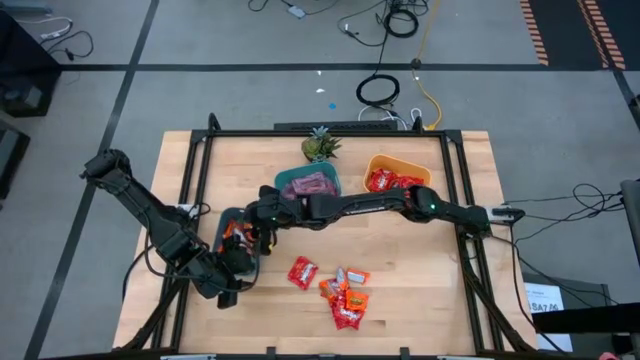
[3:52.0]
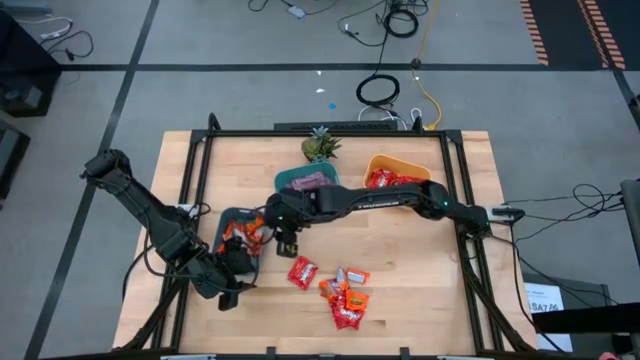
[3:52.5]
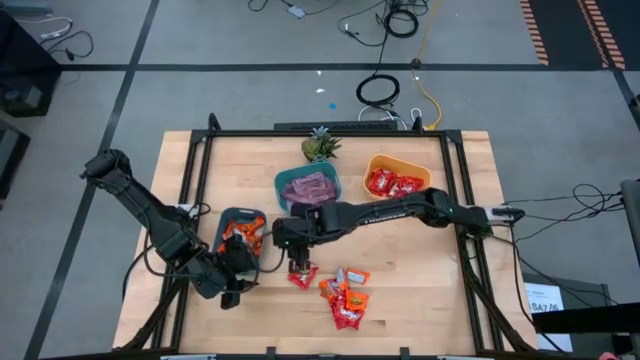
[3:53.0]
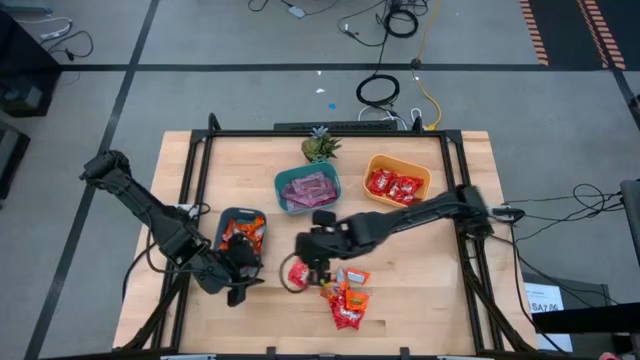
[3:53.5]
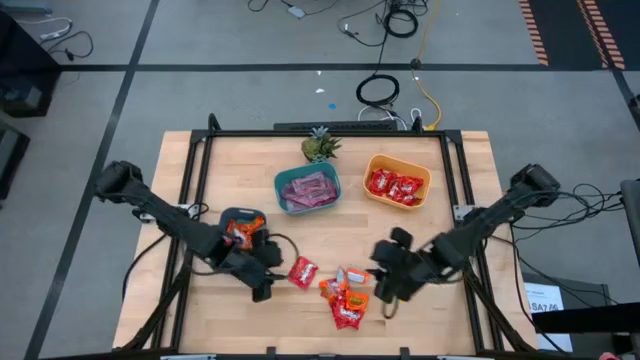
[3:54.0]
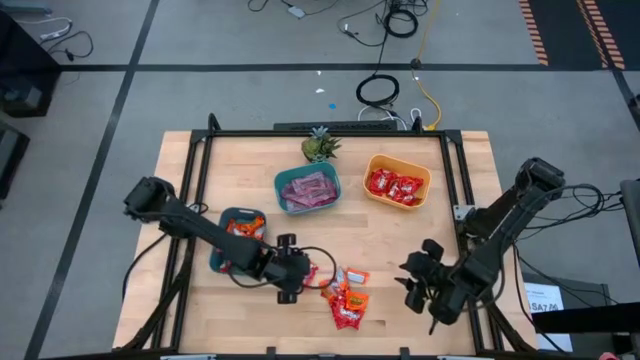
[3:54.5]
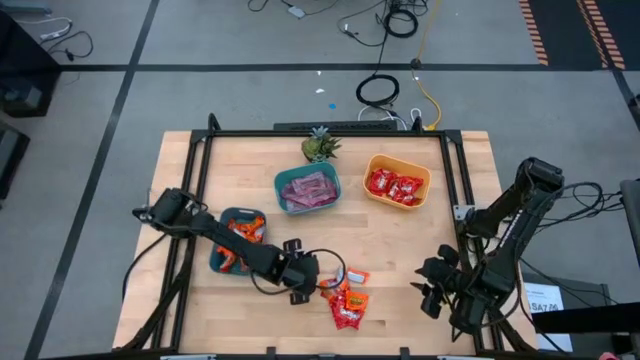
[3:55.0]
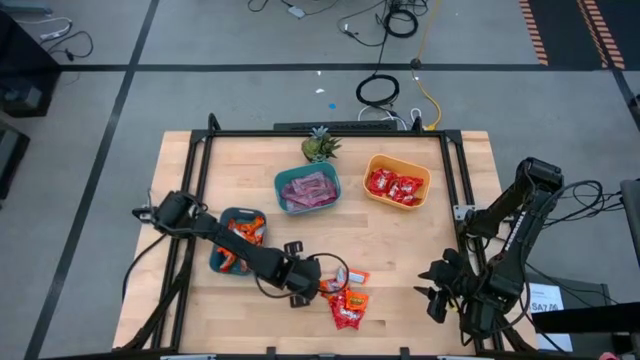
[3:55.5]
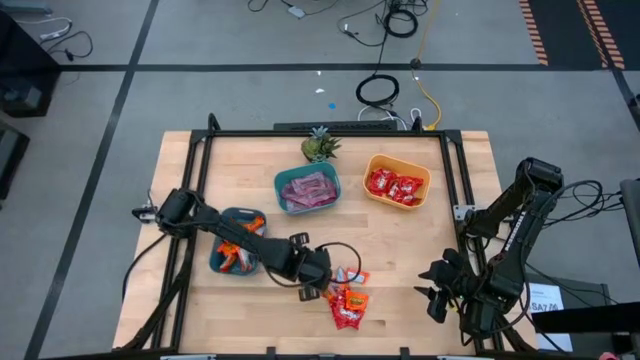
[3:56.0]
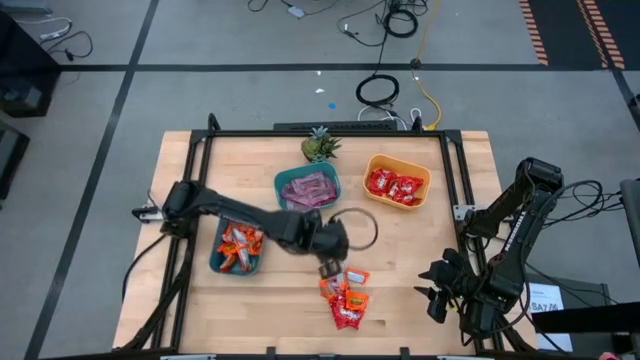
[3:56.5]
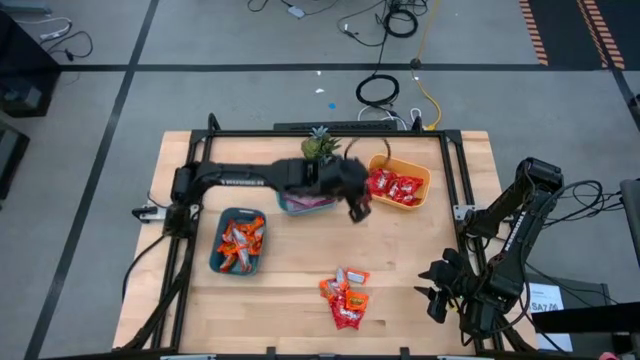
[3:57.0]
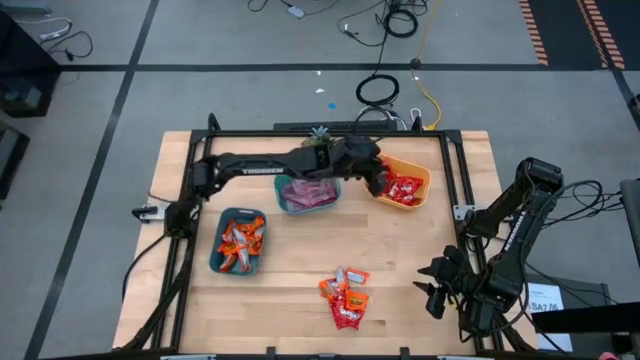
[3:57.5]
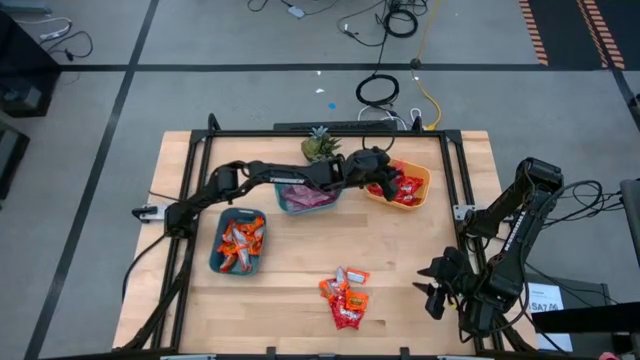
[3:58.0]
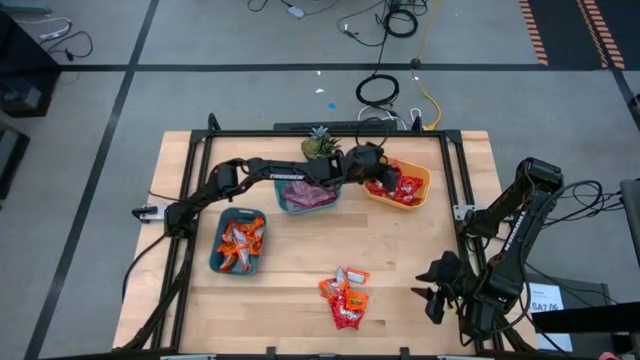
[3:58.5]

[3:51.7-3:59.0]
Task: Sort candy
Put the red candy into the yellow bin

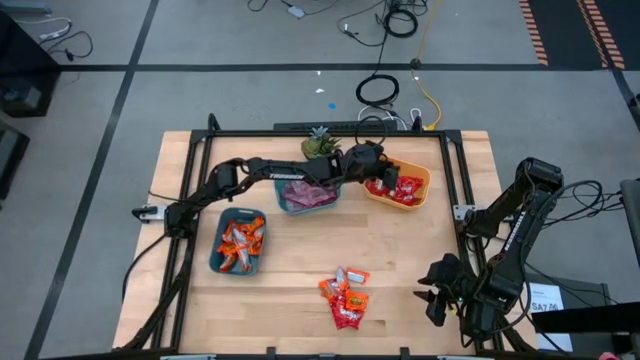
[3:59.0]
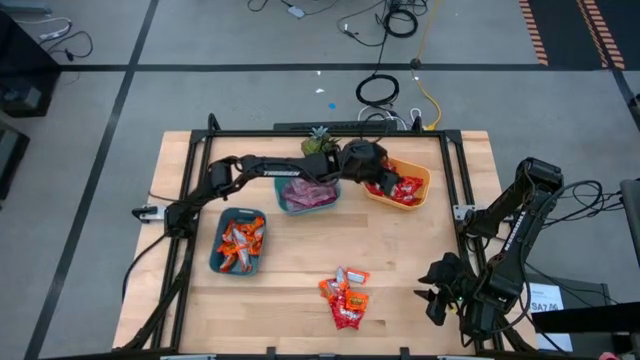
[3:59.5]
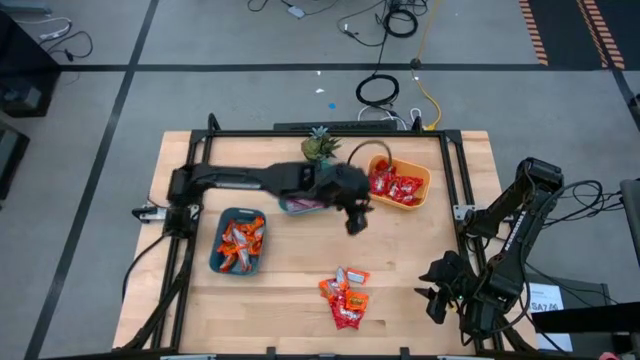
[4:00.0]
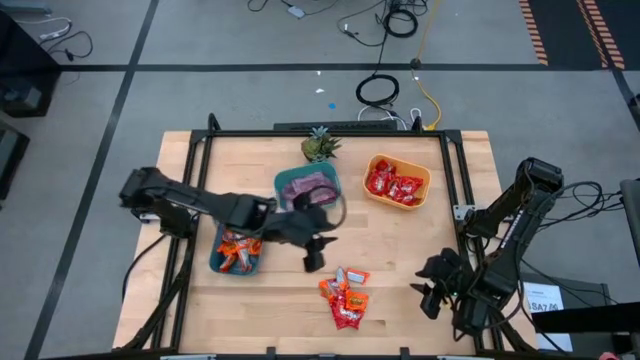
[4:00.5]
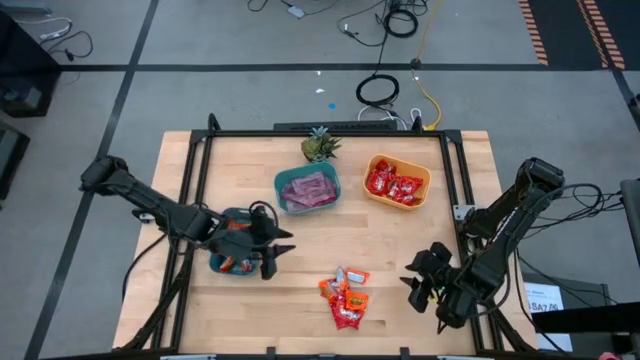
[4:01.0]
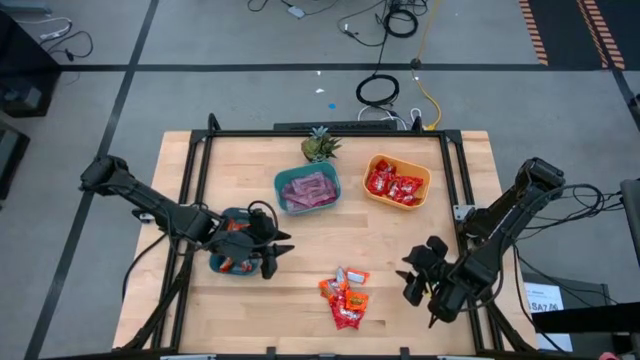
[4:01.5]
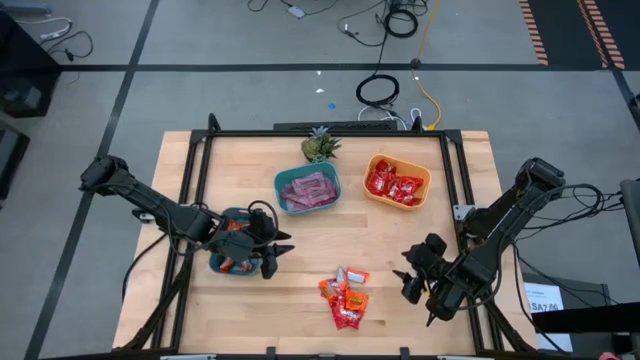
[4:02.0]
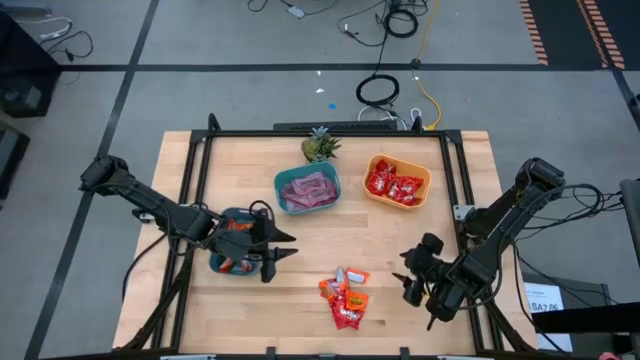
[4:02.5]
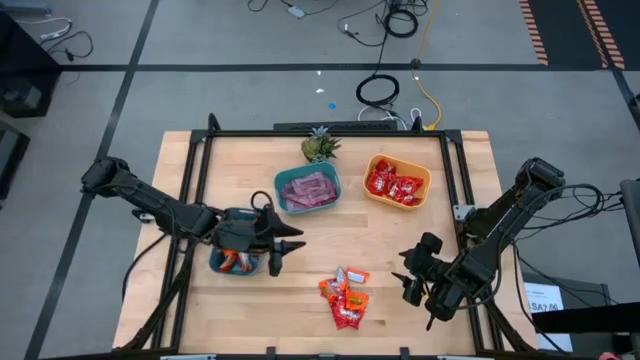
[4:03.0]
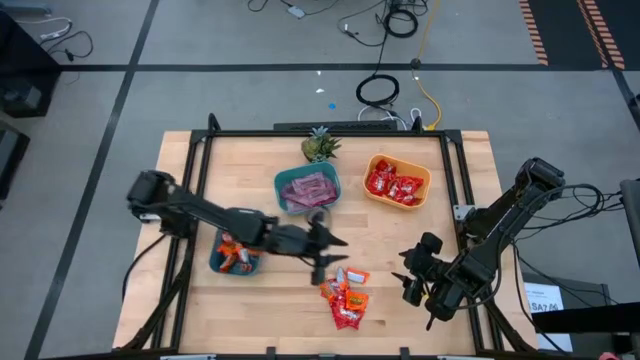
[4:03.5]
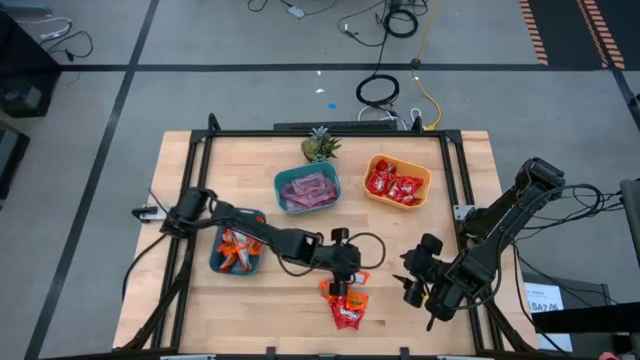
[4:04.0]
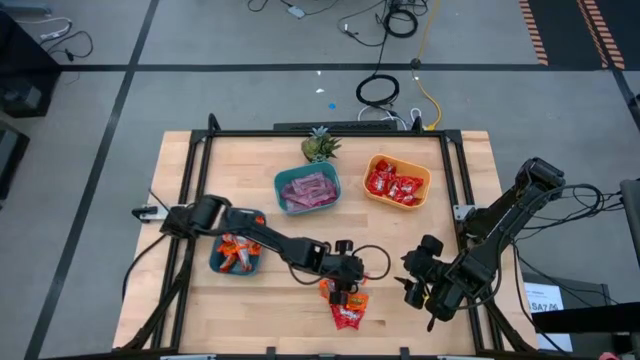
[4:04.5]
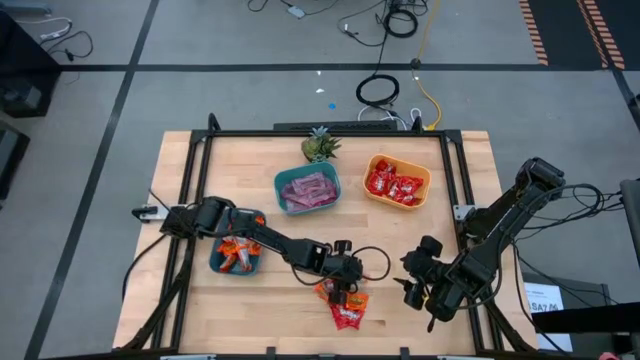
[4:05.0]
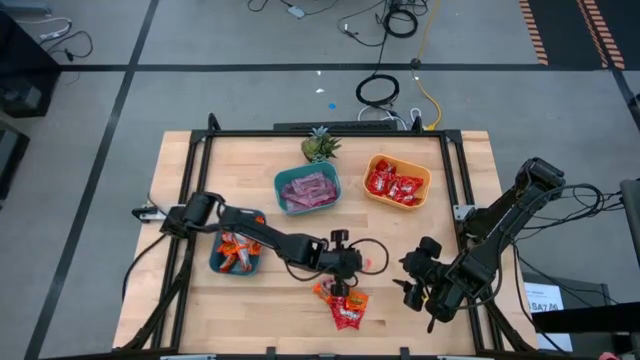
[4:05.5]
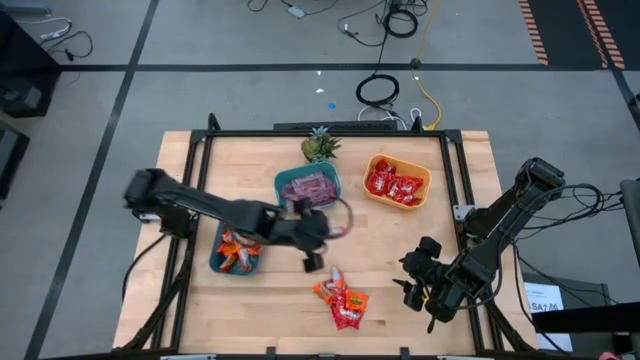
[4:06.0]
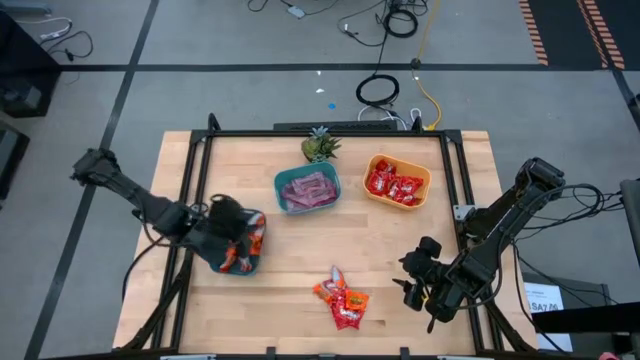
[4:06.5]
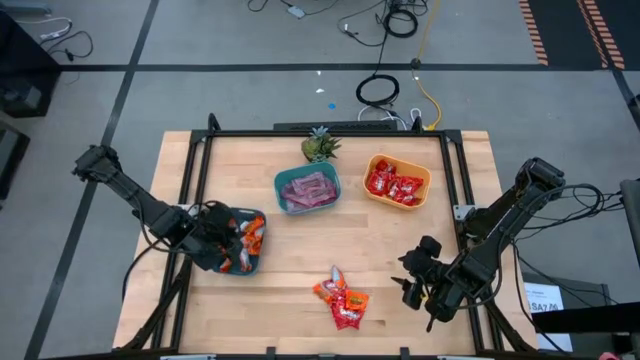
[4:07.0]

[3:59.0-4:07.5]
Put the orange chocolate into the blue bin

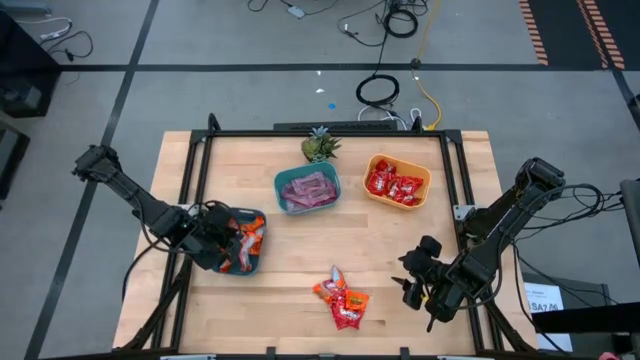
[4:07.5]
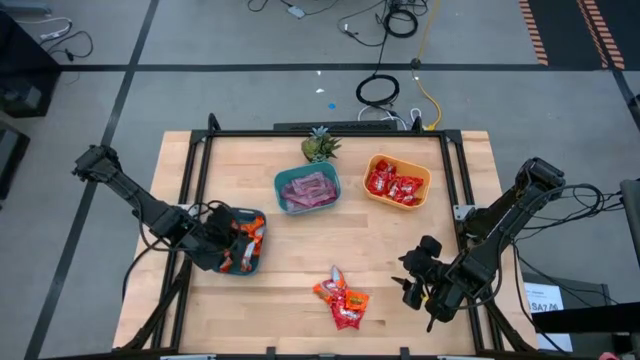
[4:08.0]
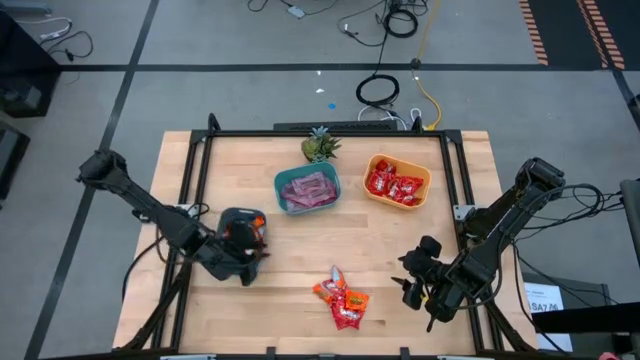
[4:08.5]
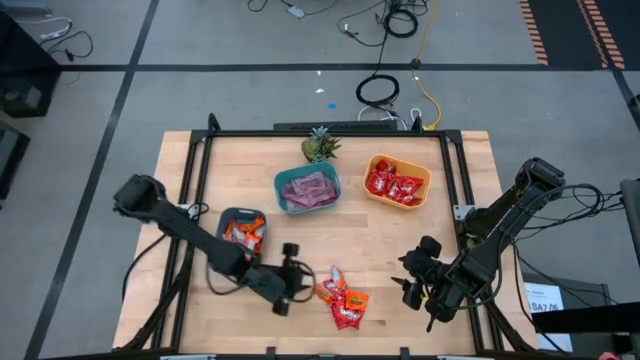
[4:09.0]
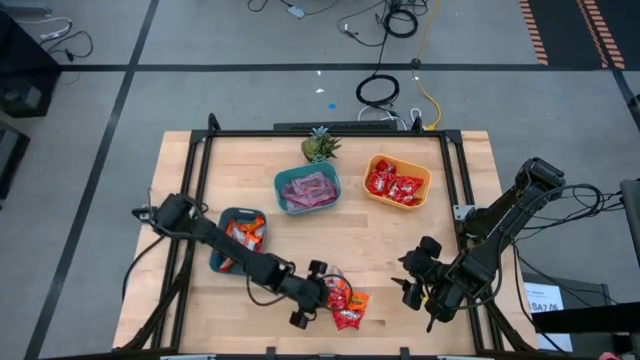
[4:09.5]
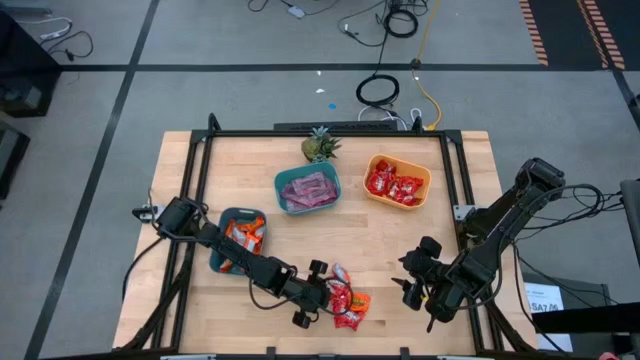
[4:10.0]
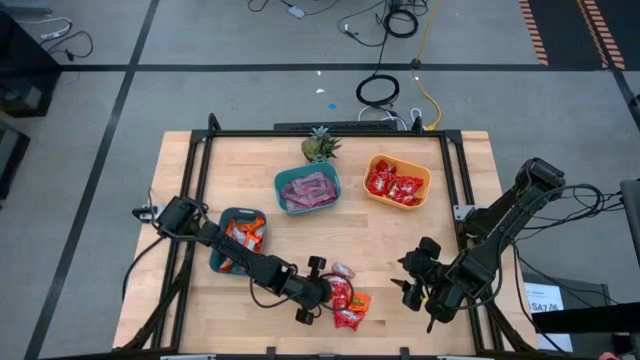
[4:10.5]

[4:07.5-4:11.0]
Put the orange chocolate into the blue bin

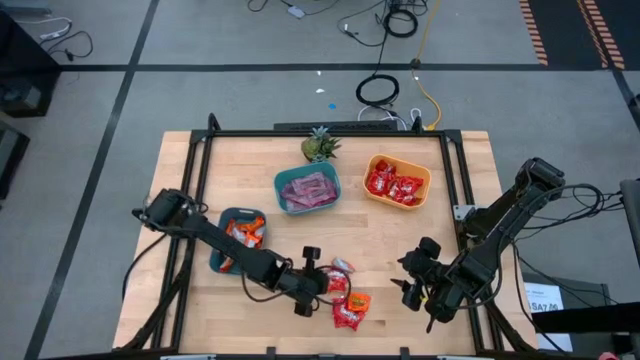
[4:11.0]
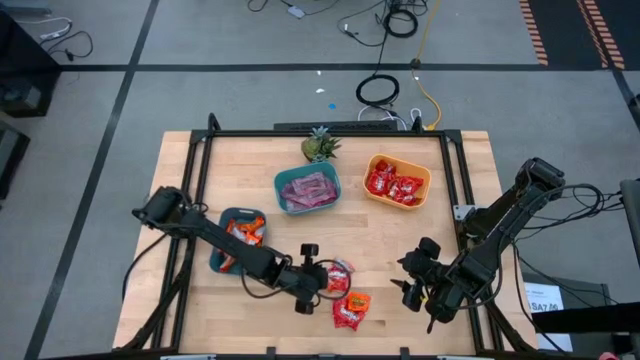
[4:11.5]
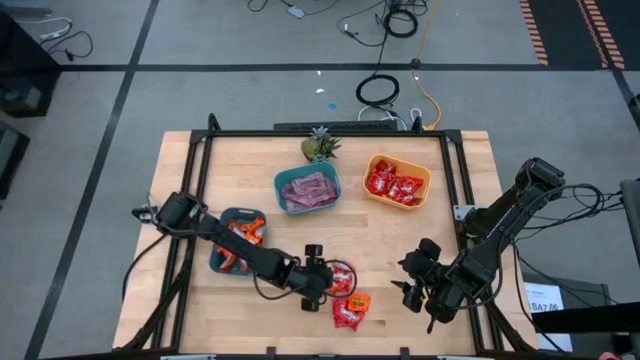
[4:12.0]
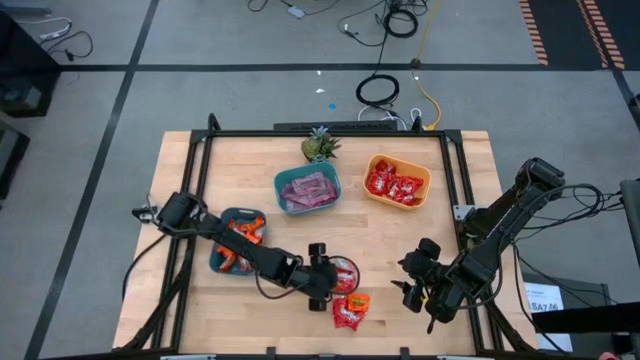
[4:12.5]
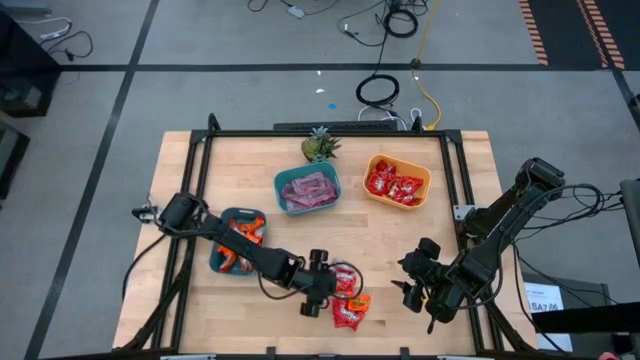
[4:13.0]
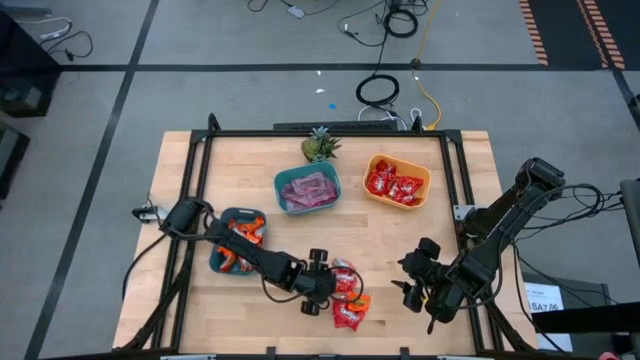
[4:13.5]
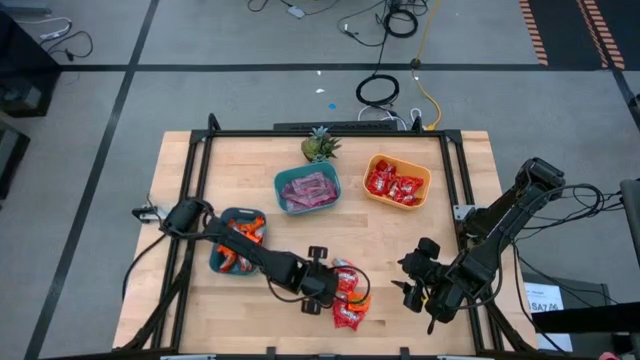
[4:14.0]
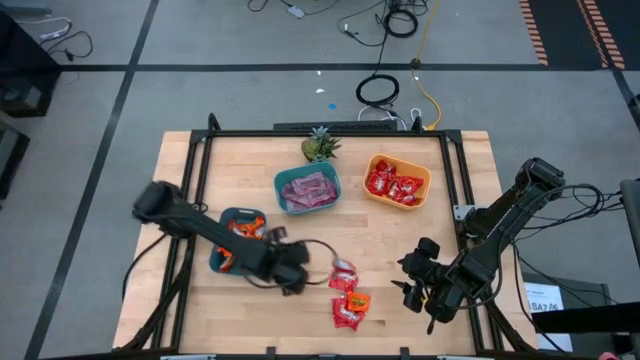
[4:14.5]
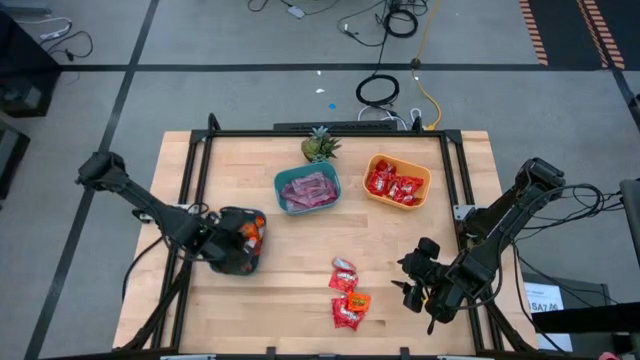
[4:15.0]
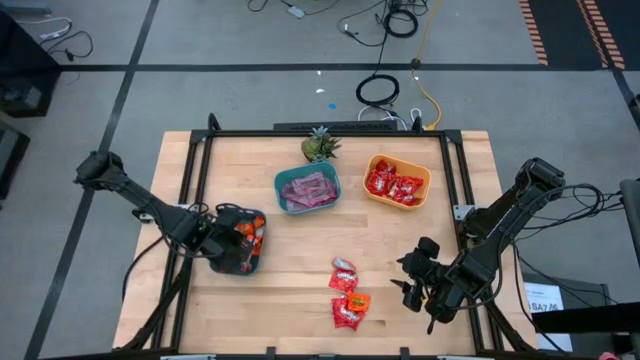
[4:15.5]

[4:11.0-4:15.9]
Put the orange chocolate into the blue bin
